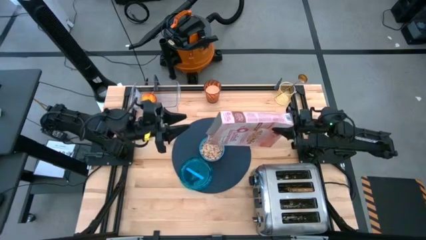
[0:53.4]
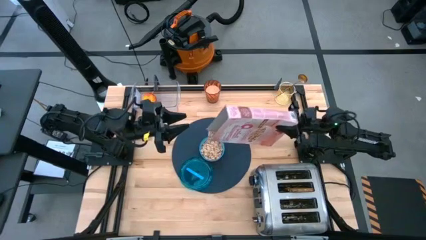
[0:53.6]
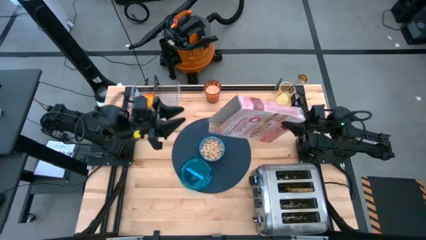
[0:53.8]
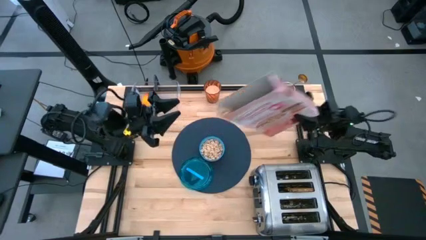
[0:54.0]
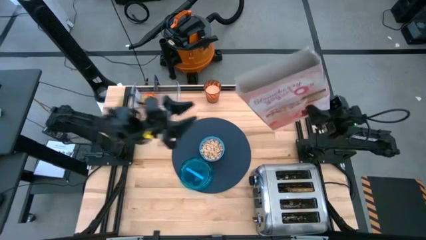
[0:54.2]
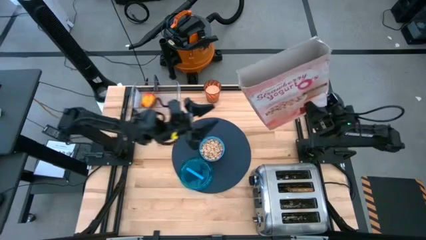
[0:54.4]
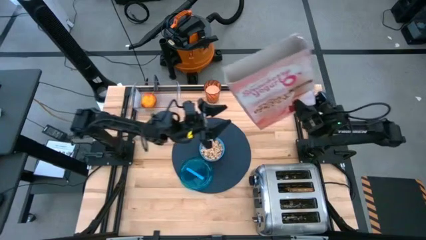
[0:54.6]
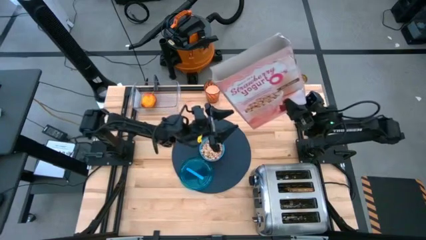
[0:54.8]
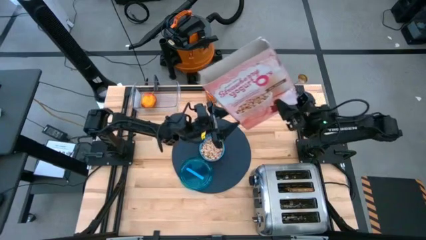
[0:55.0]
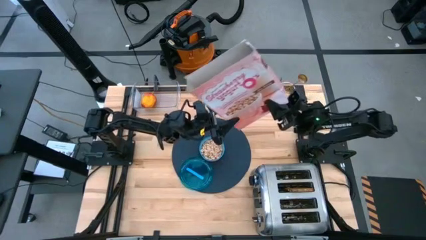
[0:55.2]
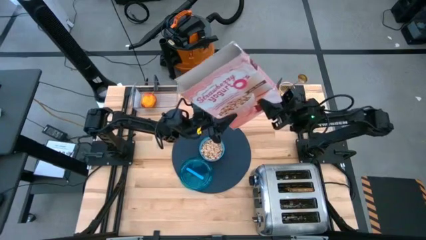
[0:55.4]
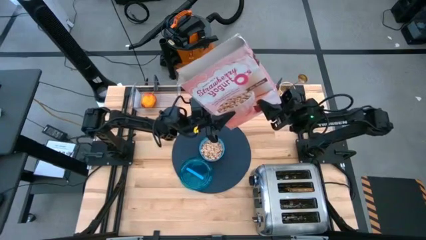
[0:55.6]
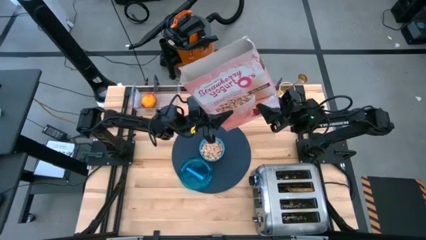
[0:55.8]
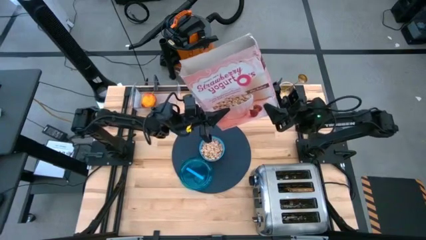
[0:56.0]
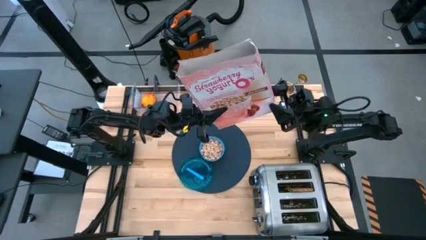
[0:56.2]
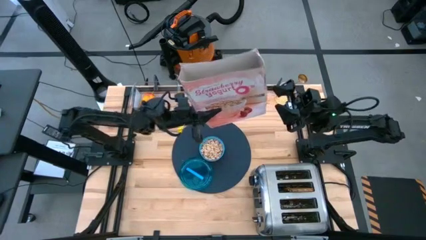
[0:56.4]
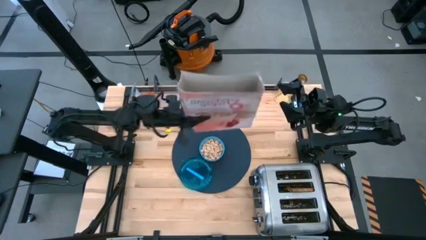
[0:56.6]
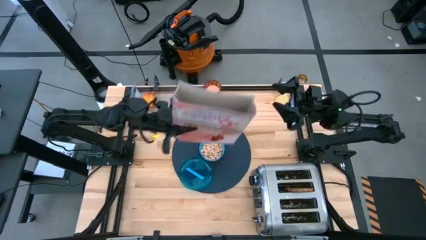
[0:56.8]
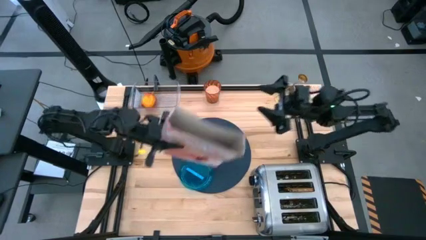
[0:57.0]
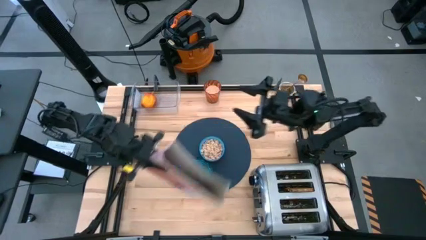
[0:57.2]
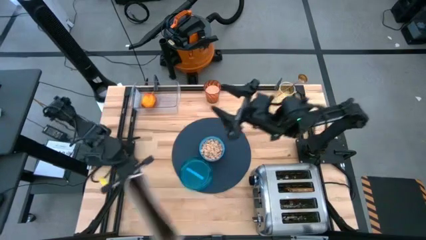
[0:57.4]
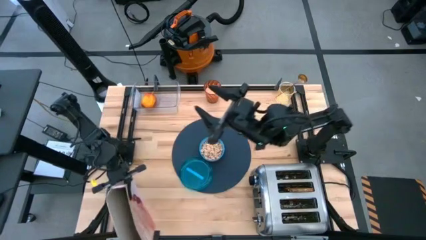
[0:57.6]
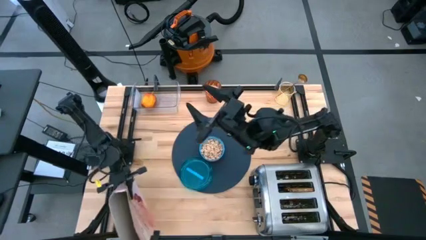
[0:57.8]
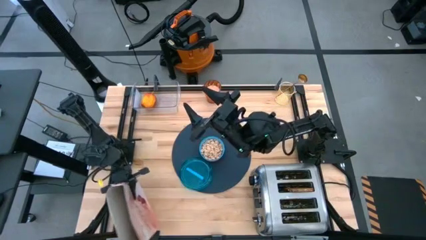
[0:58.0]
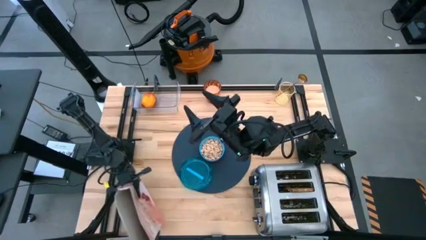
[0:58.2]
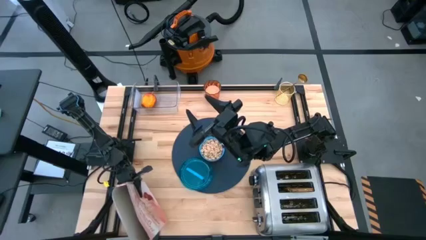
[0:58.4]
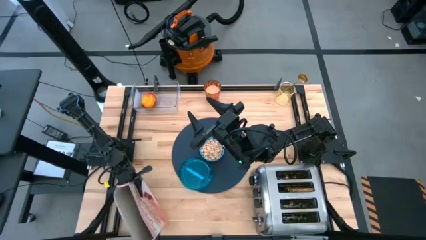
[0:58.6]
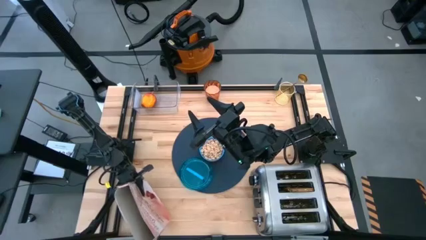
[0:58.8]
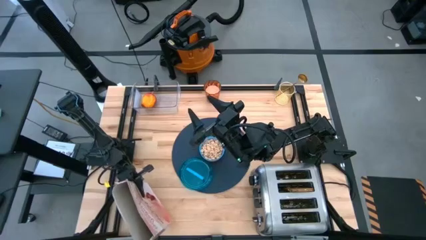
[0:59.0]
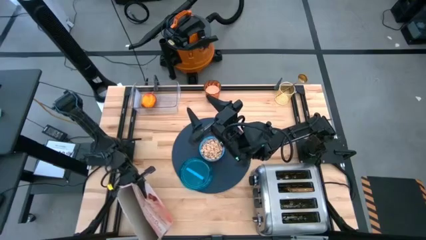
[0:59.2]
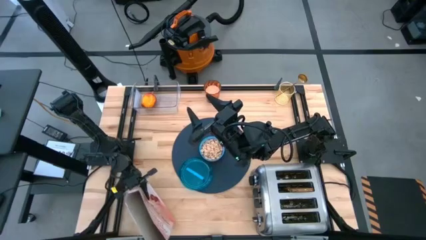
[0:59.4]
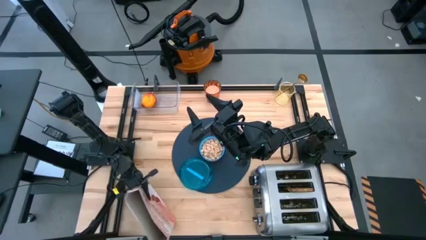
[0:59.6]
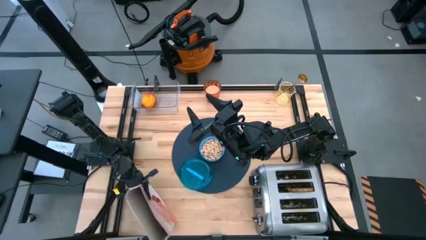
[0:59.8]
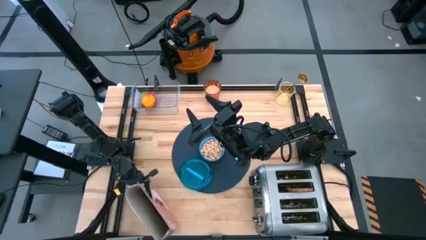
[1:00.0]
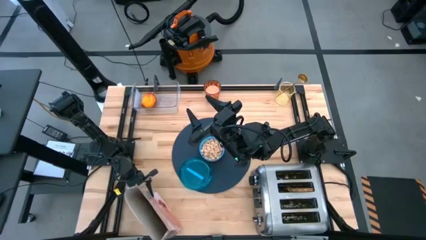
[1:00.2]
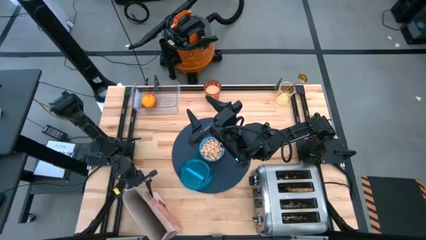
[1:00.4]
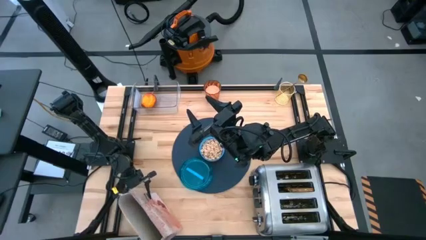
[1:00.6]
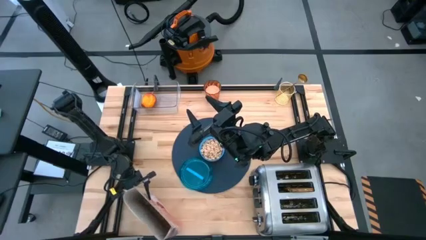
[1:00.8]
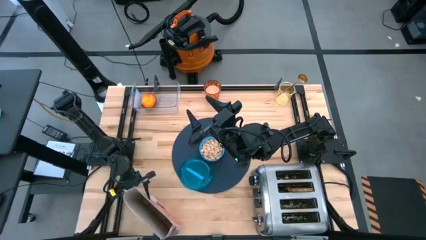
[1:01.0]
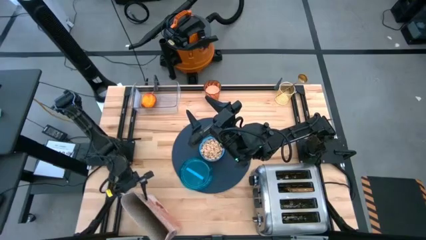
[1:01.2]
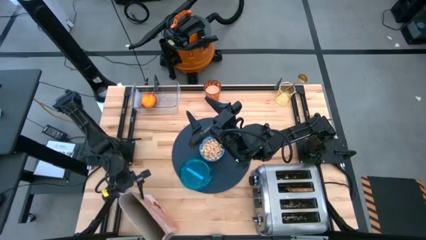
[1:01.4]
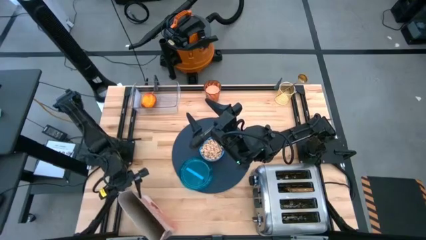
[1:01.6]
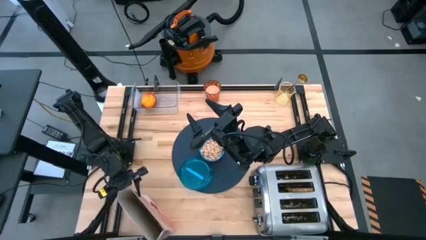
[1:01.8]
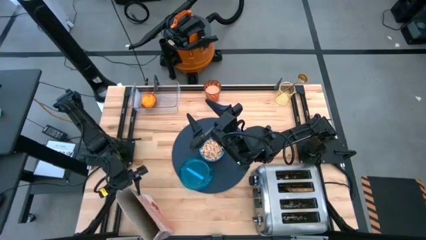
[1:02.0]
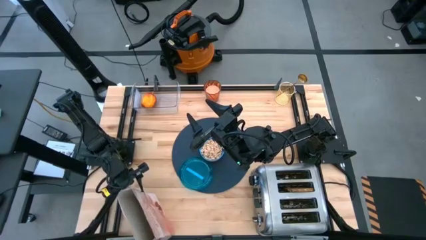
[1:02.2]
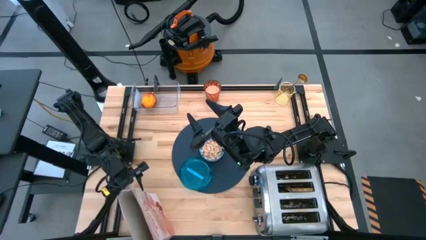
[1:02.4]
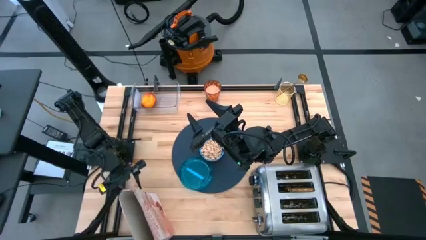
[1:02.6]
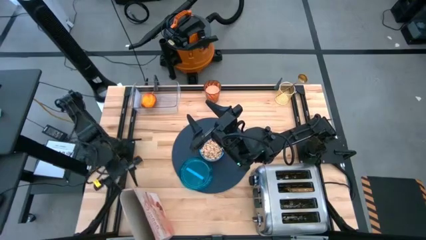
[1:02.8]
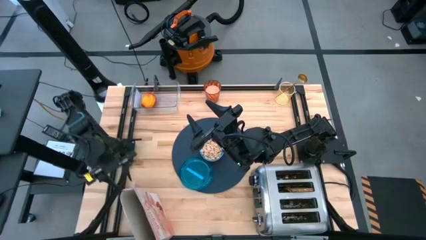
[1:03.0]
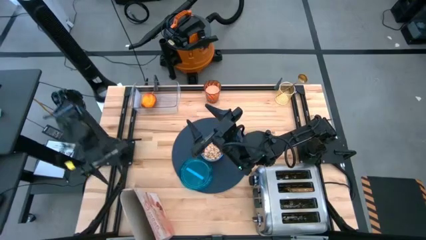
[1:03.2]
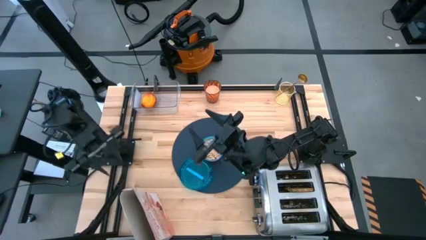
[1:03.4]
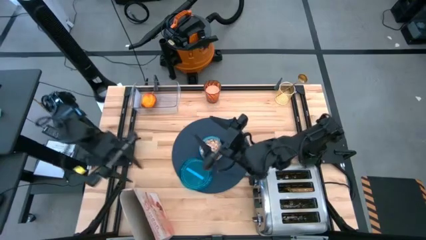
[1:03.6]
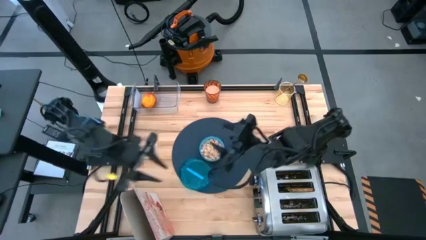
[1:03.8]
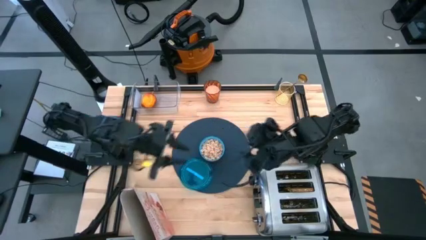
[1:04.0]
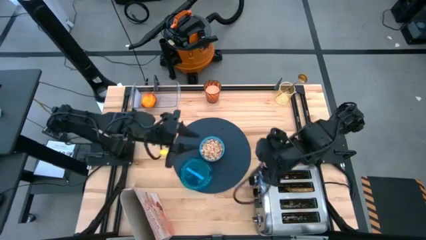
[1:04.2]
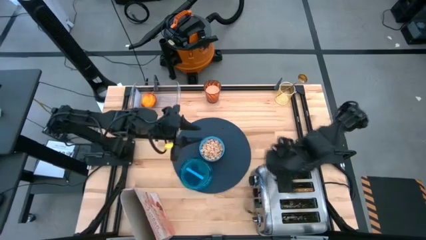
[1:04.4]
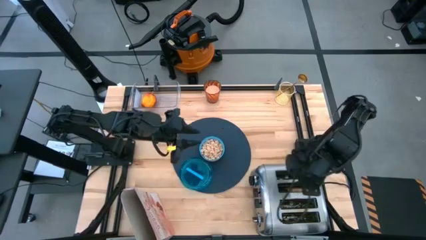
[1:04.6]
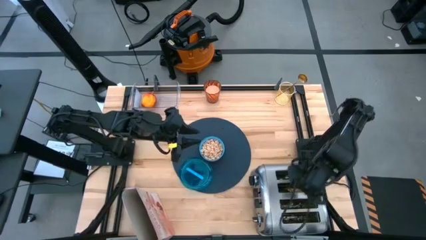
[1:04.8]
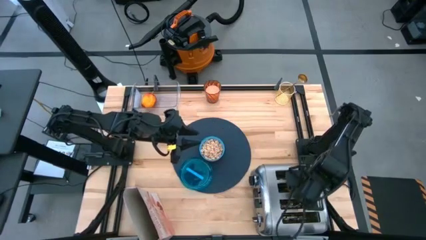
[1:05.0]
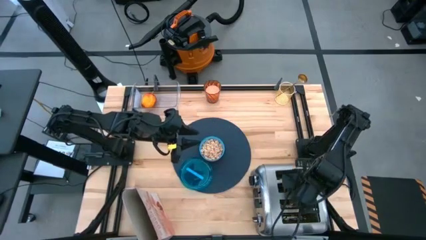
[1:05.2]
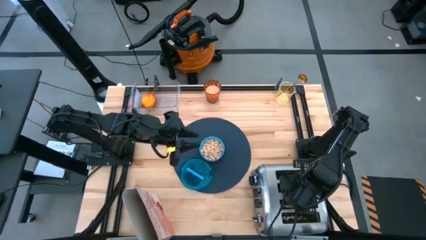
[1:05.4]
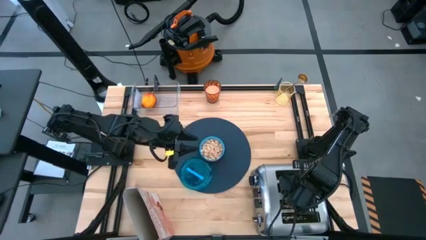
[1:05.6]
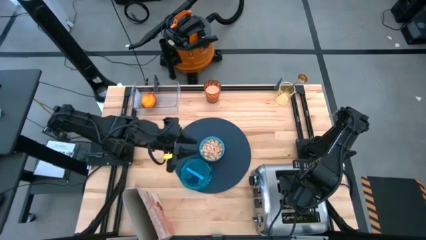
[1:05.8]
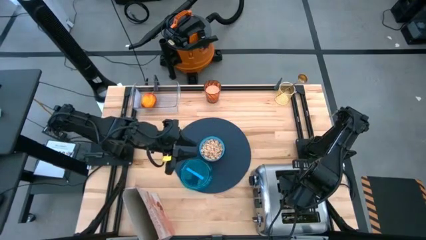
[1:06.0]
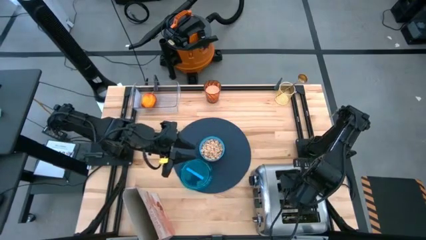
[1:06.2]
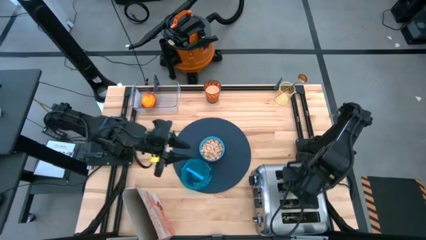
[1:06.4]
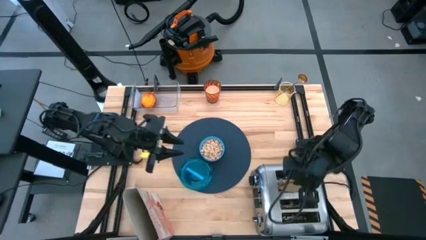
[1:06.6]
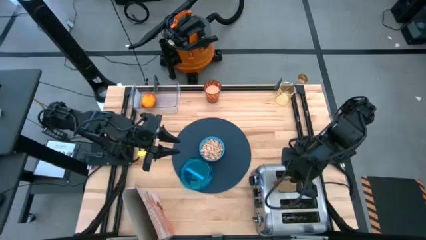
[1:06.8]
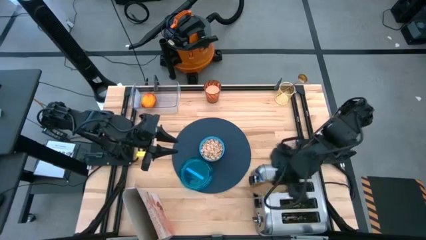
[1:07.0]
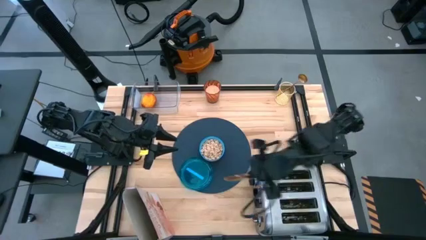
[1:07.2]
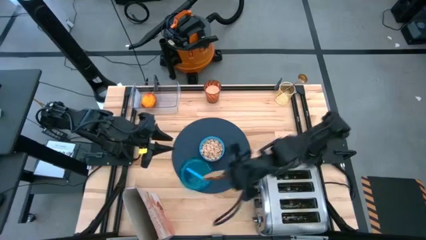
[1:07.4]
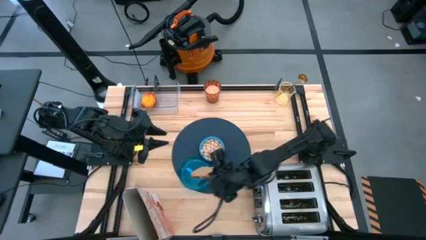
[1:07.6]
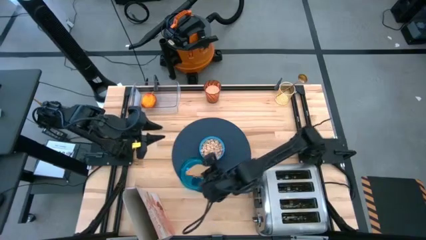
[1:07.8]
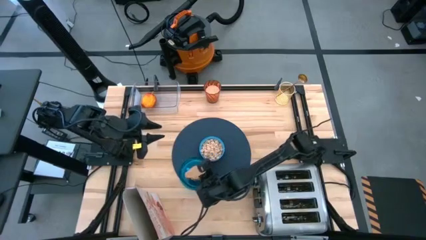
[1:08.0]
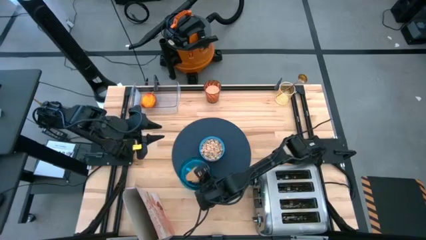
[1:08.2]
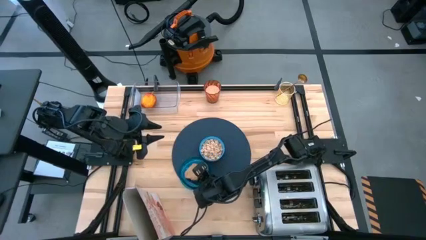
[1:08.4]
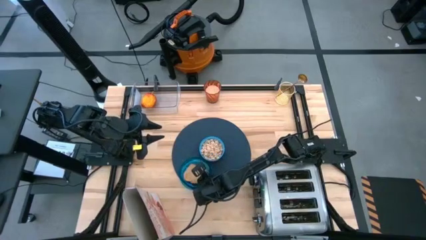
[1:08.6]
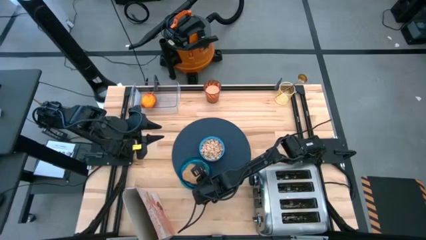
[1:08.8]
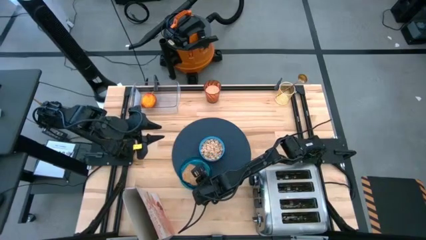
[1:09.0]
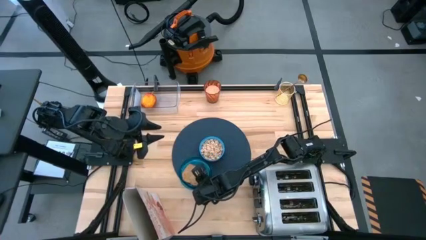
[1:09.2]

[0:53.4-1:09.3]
Task: Arrange a breakfast setting
Put the bread from the toaster on top of the plate on the placemat
